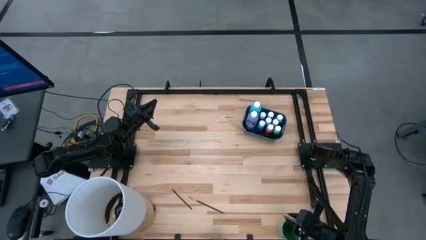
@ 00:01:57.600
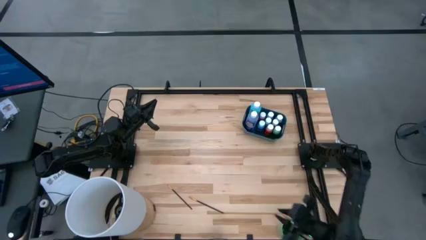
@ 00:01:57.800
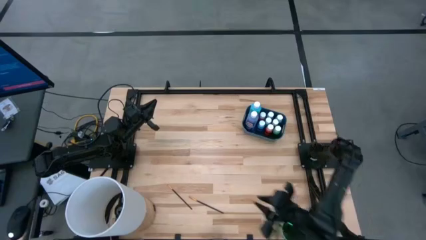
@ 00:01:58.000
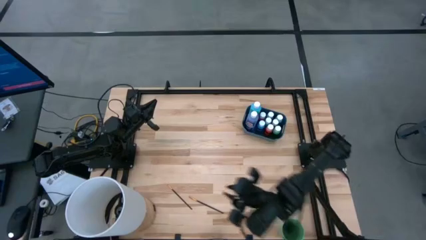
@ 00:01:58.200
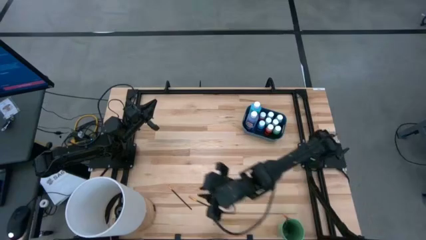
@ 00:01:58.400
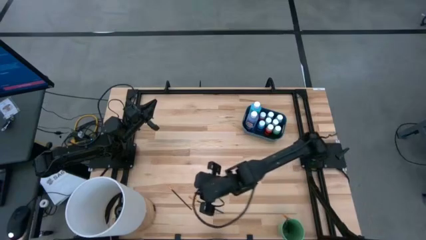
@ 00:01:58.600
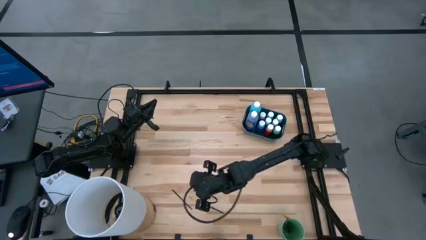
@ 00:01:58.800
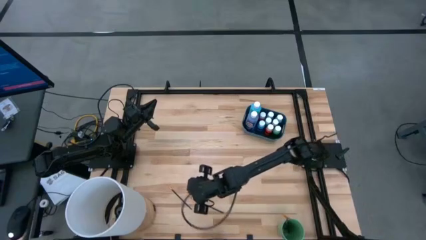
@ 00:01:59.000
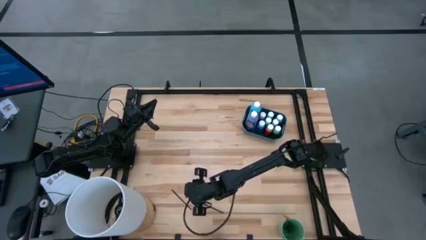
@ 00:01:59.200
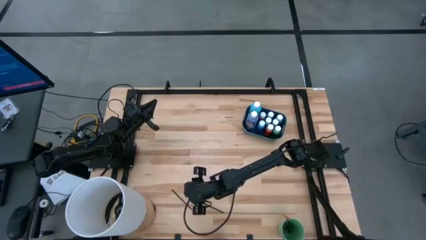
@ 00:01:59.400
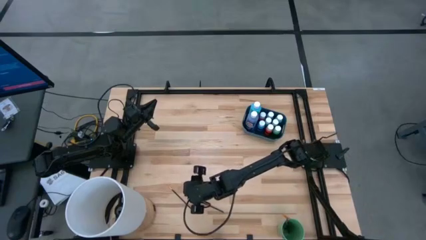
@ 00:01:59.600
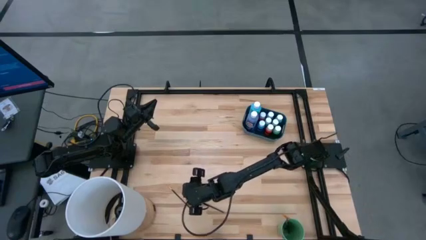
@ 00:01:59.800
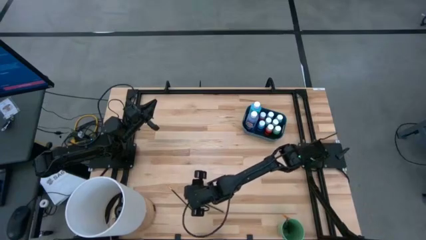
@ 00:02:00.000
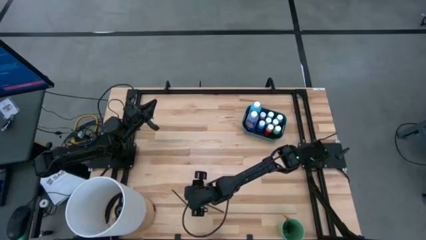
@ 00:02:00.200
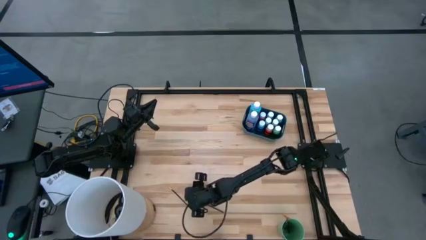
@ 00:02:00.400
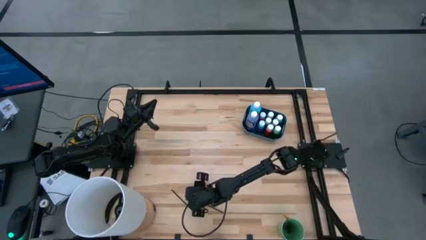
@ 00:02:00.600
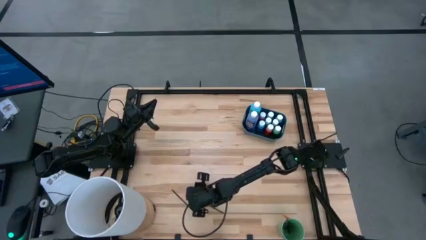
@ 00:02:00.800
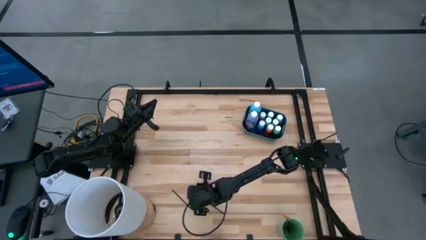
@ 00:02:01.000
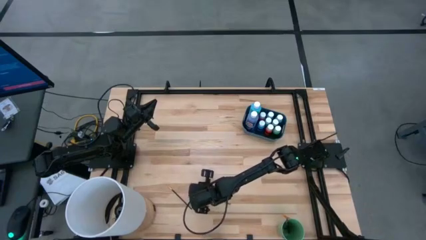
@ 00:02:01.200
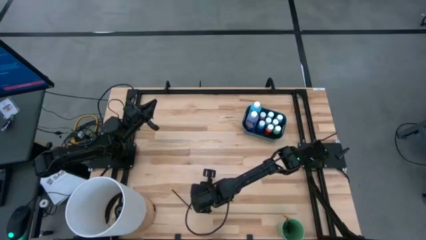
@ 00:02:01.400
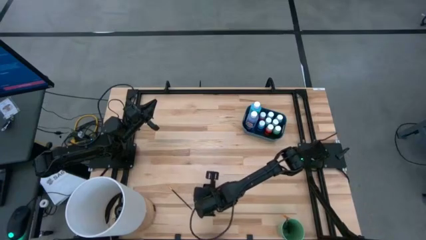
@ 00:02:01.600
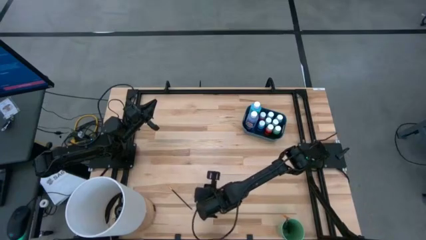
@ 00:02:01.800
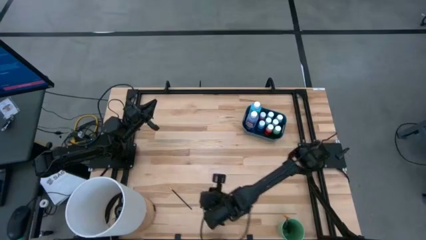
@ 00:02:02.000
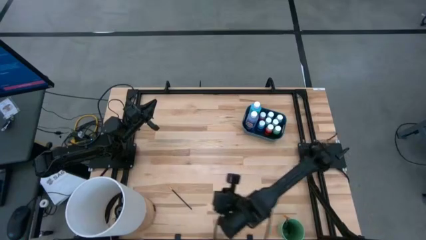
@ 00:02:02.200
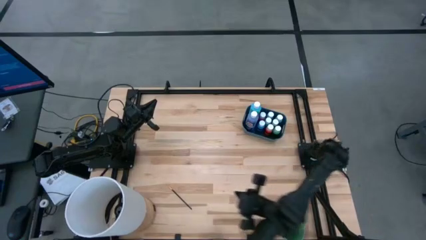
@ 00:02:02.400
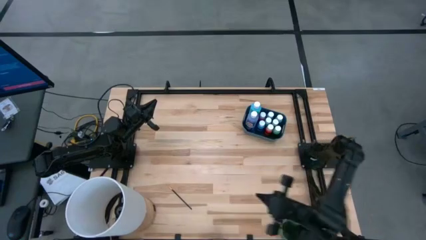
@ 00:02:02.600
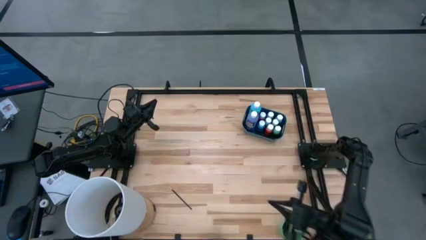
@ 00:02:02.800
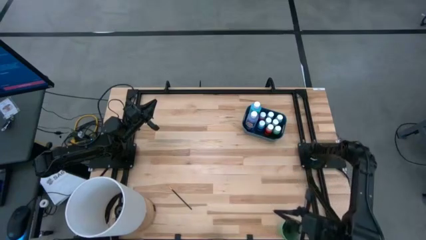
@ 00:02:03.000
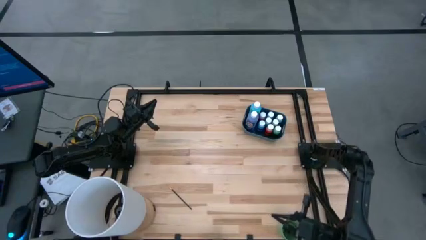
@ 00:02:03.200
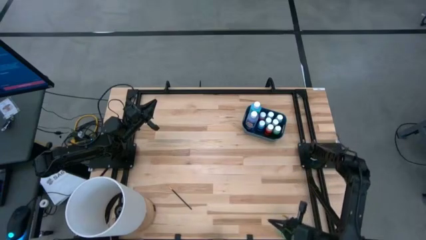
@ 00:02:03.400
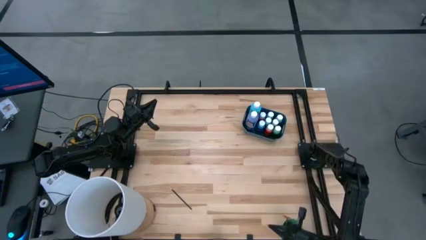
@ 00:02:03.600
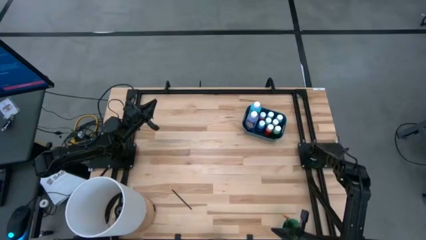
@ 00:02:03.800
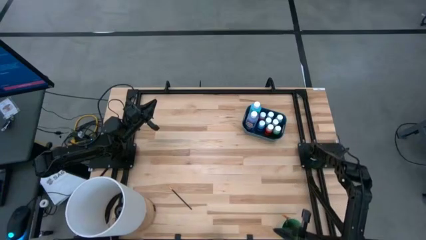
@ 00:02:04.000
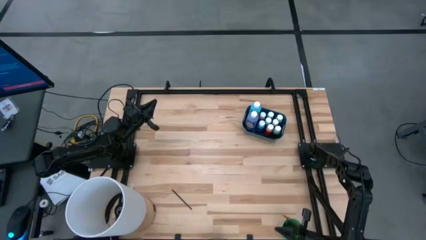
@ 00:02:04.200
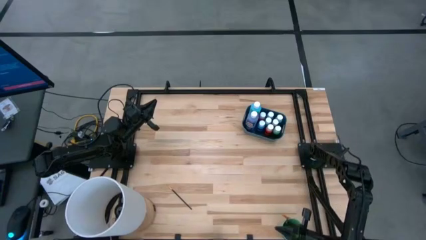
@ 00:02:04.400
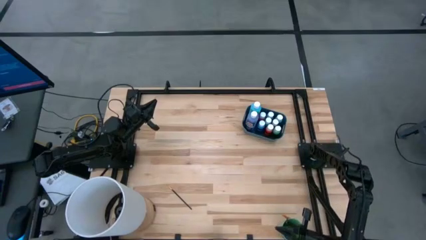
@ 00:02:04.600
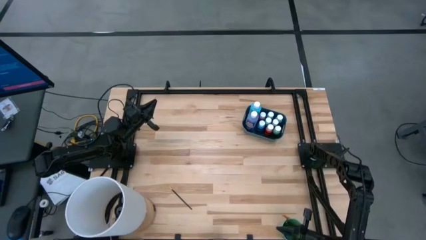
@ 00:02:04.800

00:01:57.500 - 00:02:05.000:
Task: Pick & Place Paint Supplies
Put the right gold paint brush into the green cup

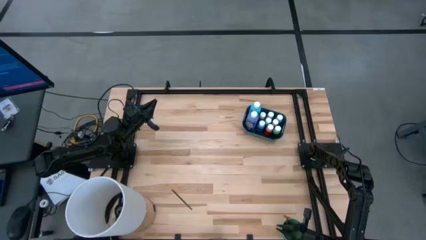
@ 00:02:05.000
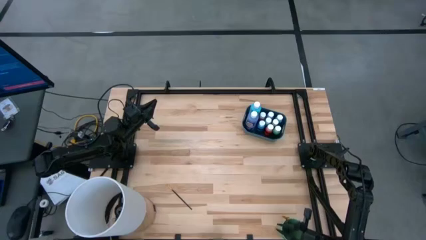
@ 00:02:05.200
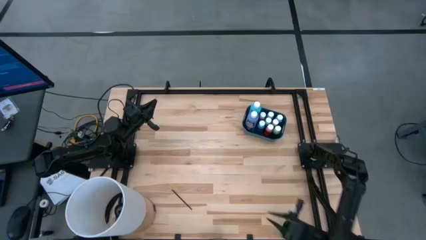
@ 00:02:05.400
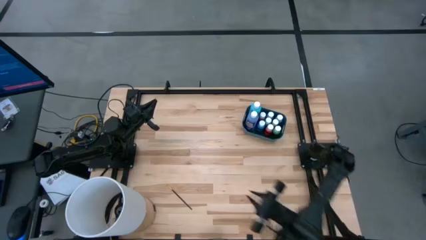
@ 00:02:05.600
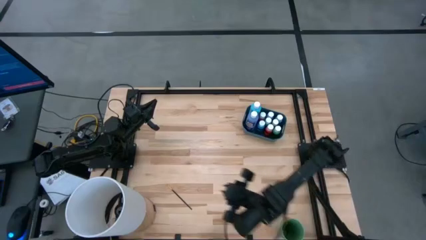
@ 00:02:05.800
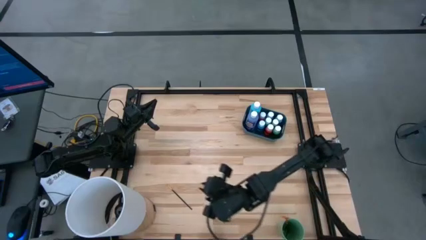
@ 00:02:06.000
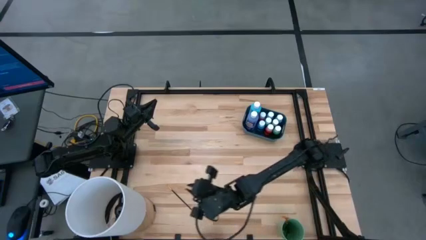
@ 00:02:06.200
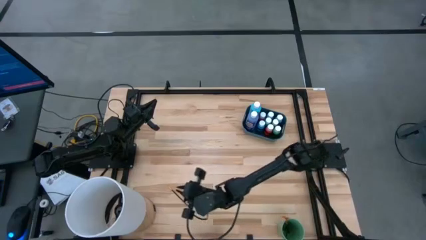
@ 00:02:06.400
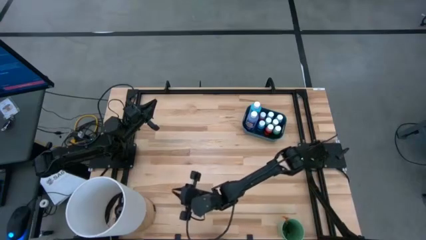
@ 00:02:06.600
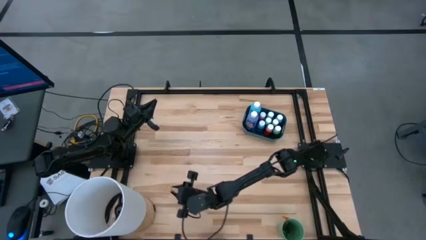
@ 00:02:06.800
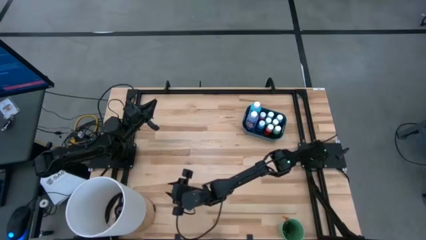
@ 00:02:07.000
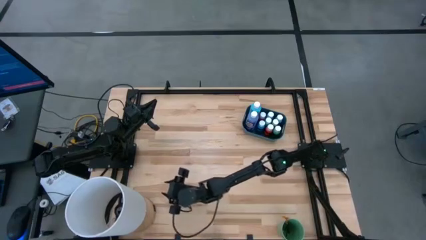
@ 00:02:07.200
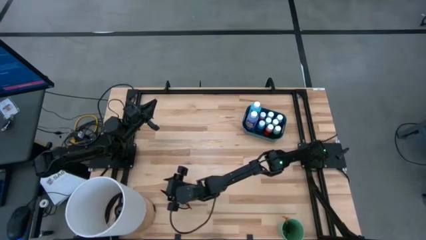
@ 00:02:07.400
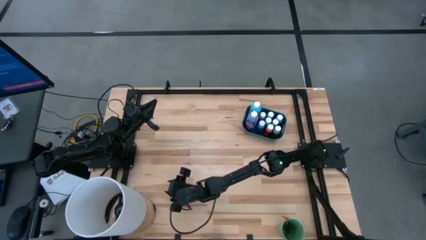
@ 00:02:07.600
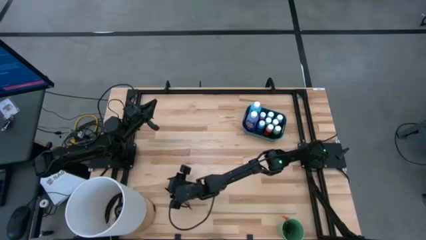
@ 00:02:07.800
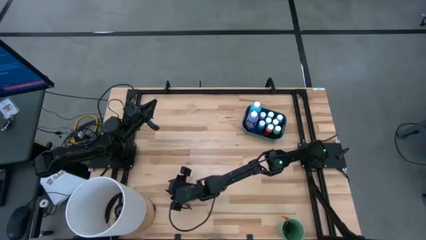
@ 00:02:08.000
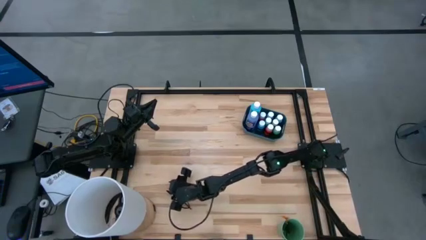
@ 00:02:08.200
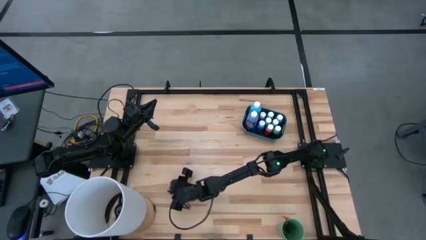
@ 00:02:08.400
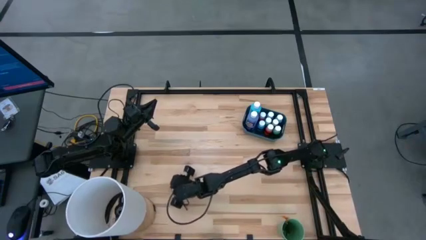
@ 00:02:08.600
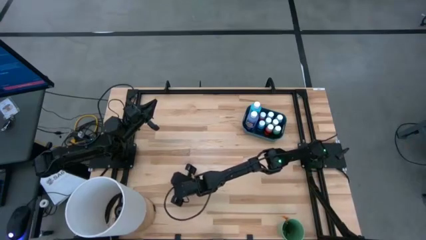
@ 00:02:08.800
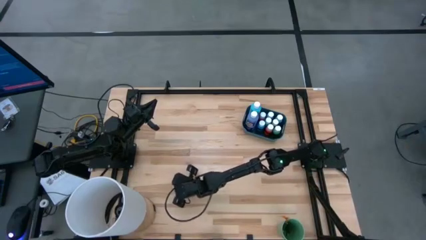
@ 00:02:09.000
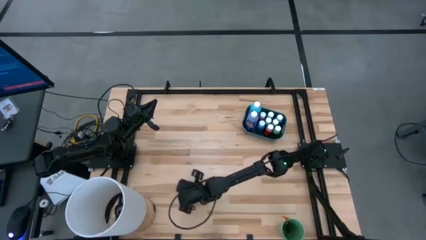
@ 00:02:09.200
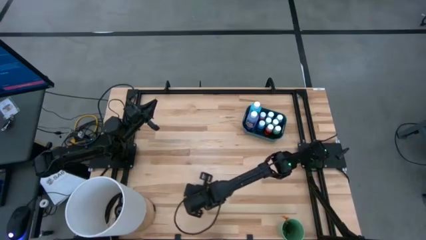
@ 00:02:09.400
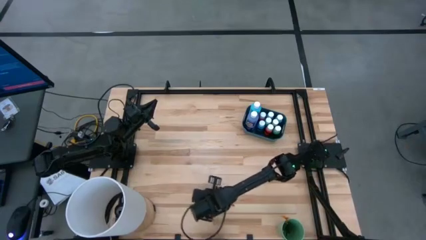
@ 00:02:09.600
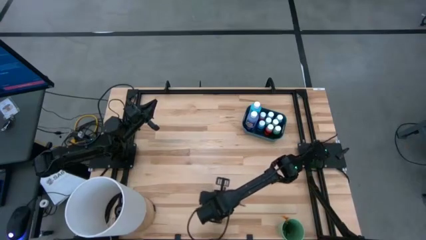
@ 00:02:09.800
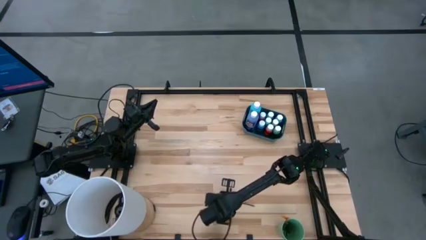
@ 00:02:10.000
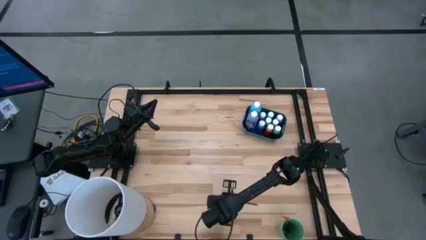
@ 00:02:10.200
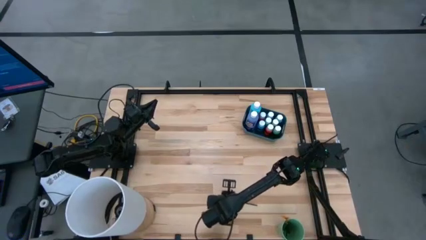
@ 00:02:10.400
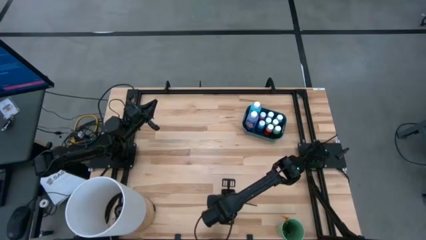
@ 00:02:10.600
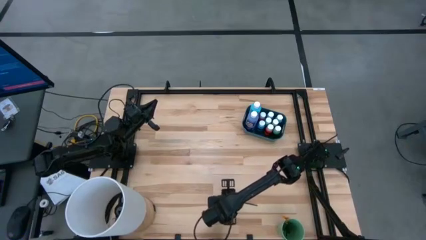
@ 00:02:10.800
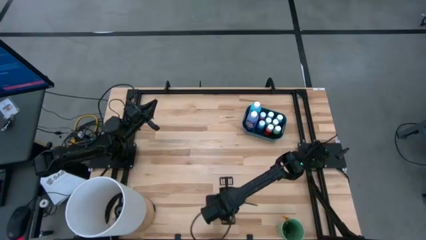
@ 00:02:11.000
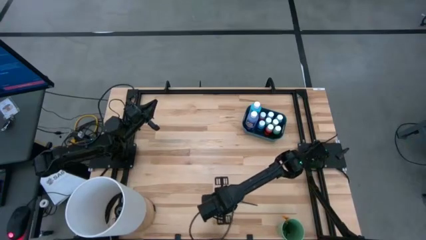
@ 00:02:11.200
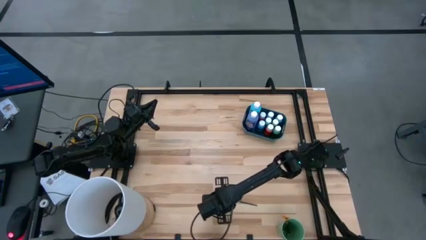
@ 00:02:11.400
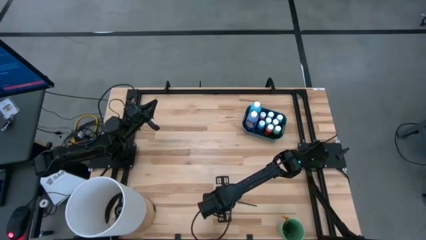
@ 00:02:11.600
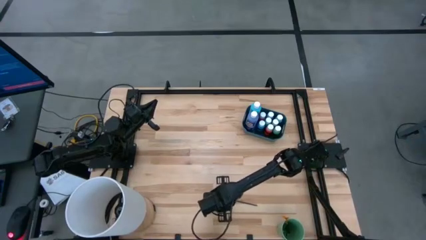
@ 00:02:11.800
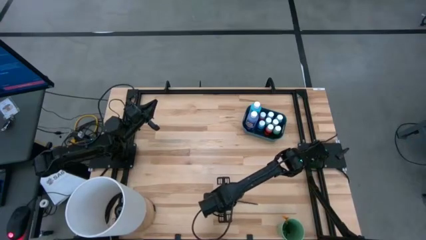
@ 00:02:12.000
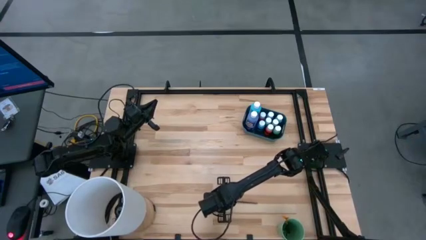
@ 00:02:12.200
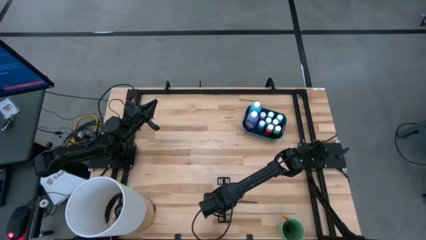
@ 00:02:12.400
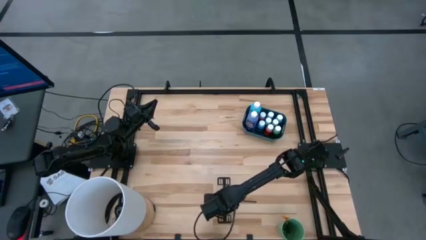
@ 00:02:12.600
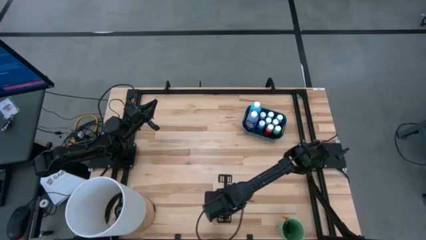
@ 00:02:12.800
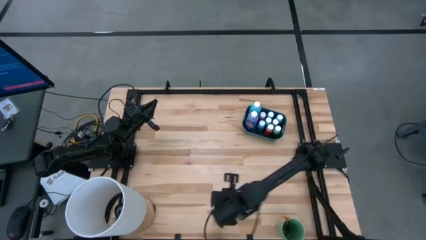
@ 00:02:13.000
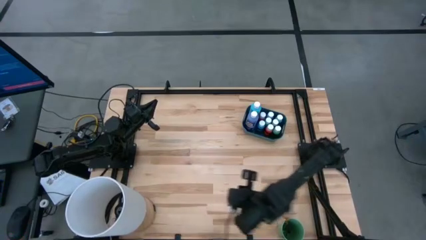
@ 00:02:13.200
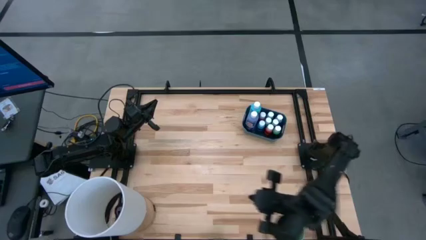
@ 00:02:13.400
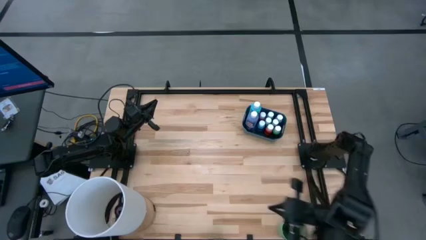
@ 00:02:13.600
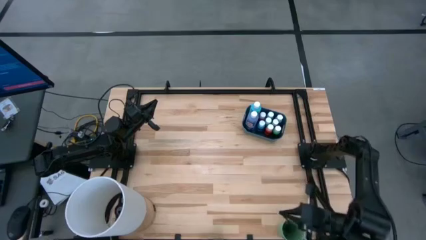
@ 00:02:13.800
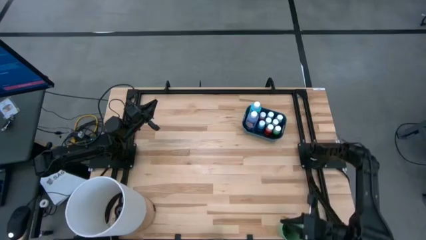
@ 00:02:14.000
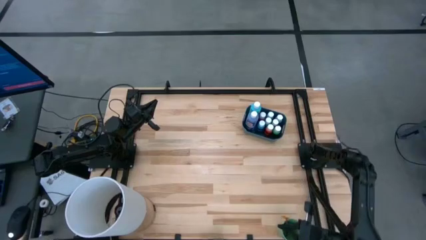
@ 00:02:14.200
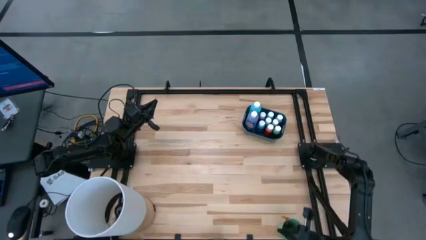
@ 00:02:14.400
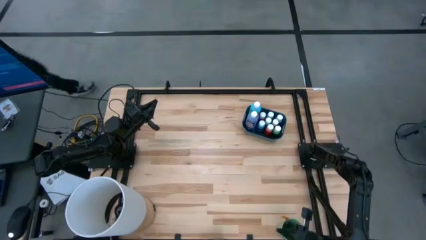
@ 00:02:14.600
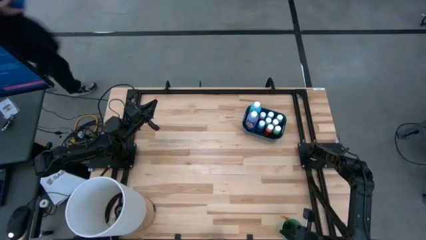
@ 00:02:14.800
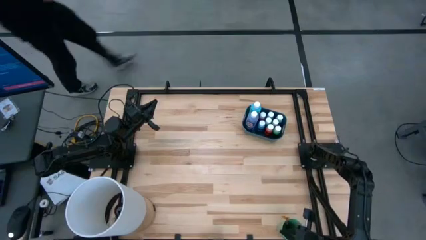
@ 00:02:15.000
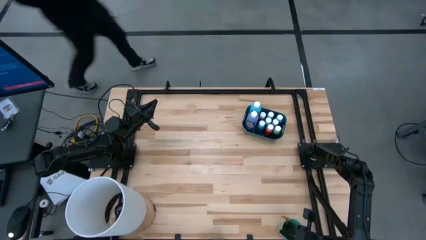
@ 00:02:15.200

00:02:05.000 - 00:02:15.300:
Put the gold paint brush into the green cup
